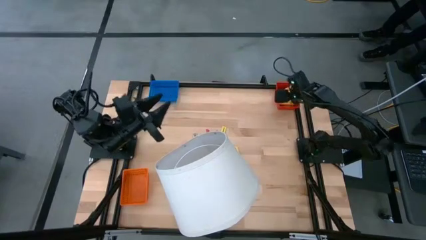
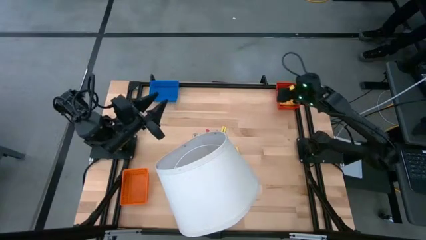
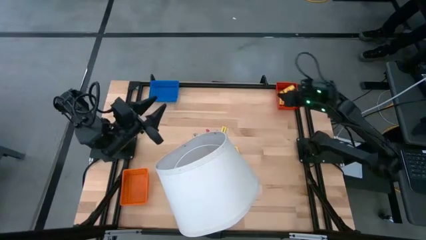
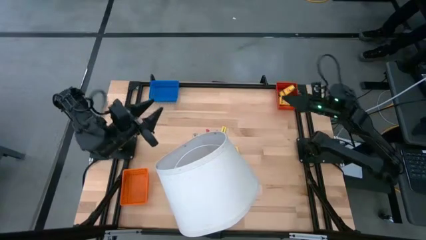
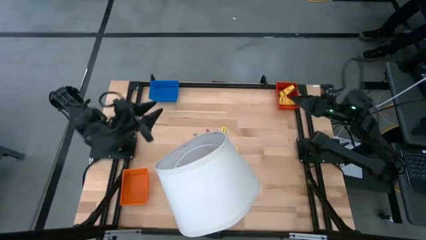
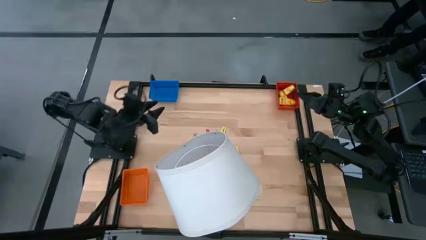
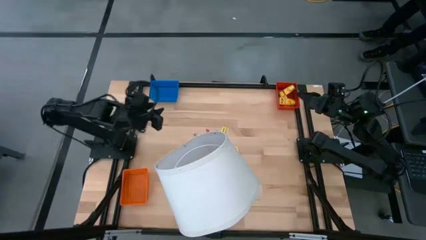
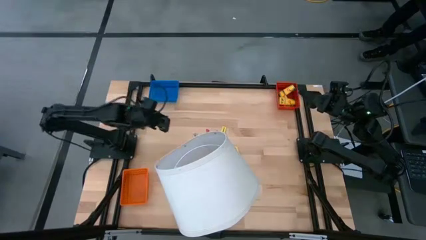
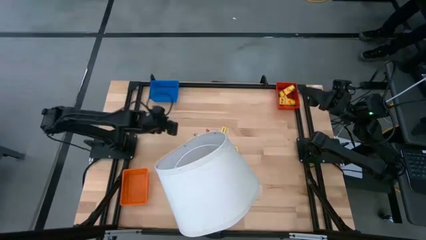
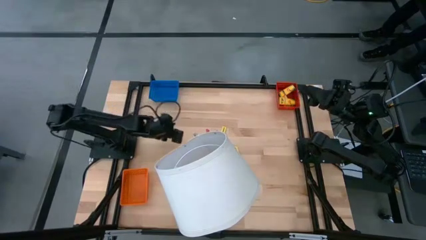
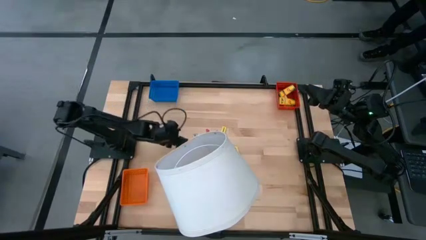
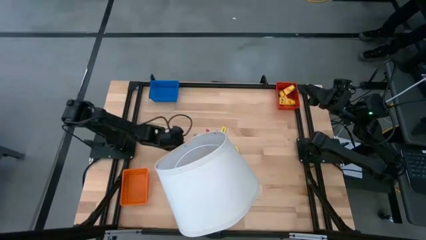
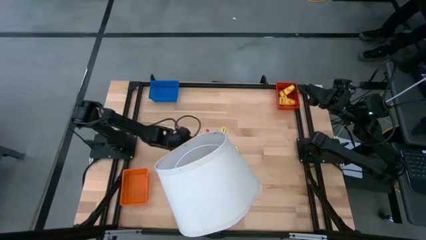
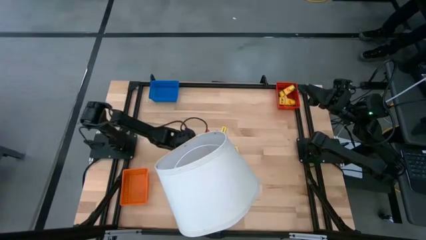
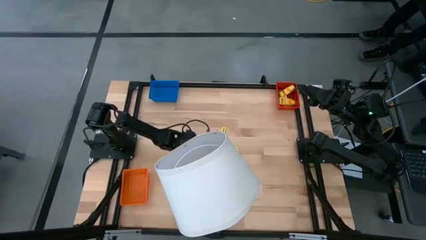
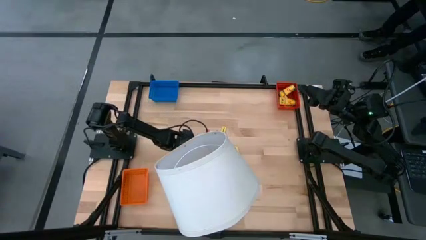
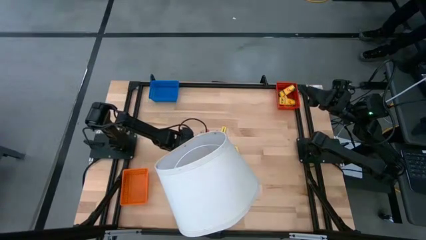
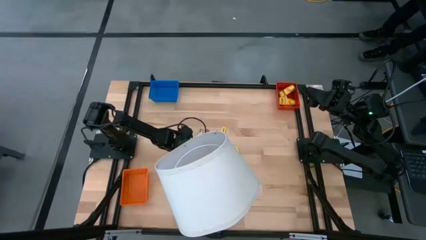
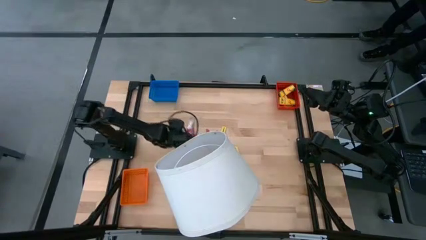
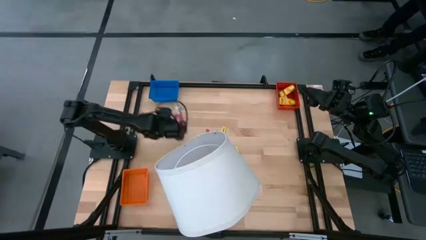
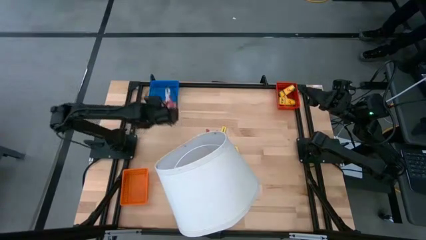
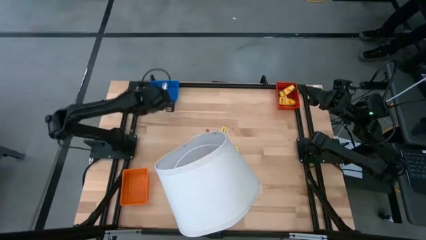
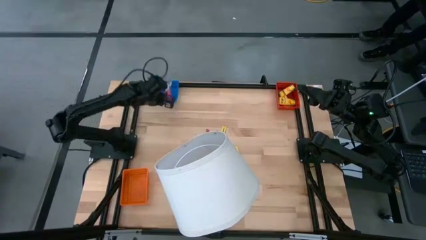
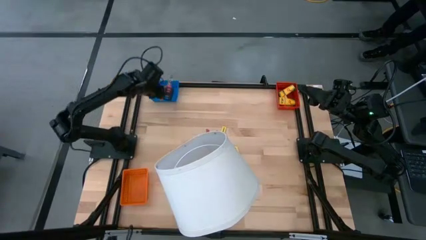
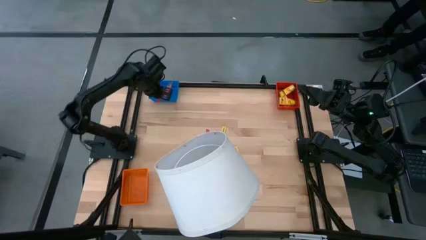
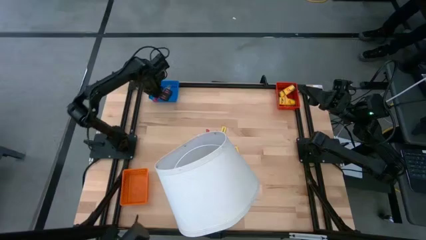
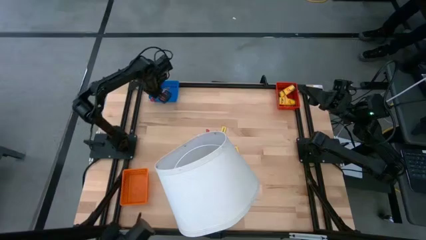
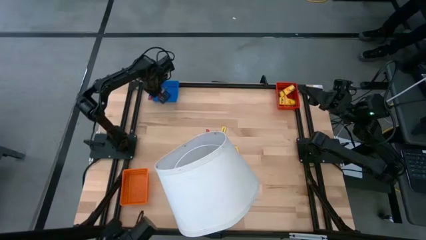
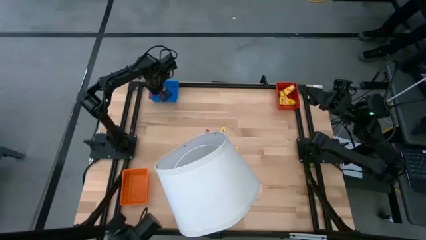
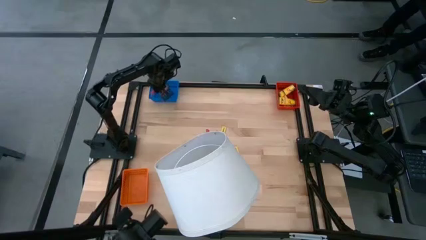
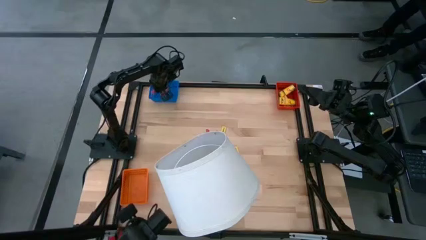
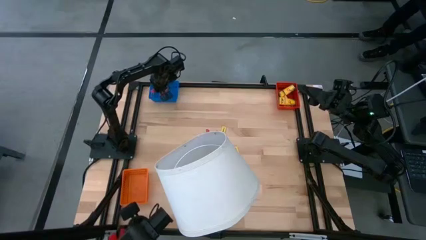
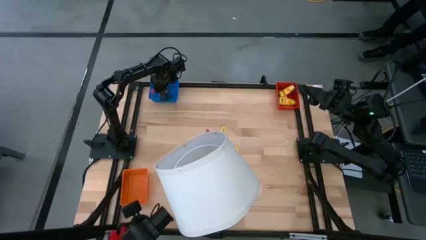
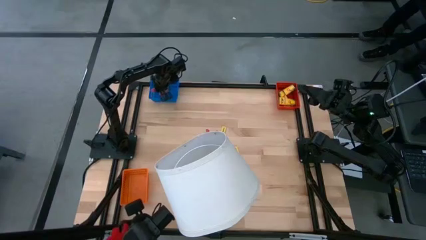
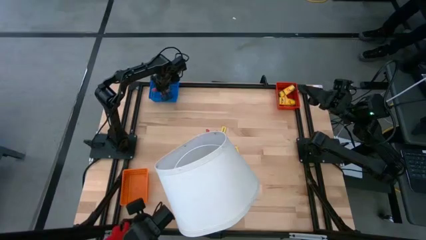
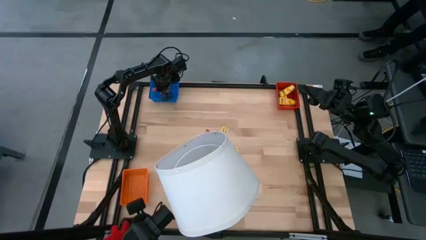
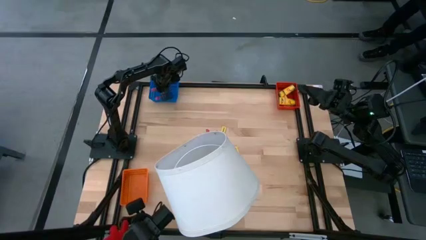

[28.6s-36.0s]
Task: Pick & Place School Supplies
Put the pink hole puncher into the blue basket

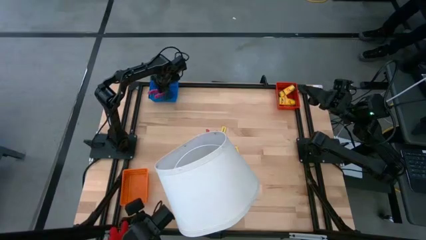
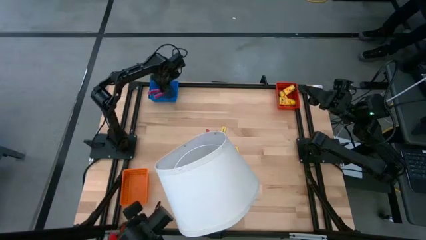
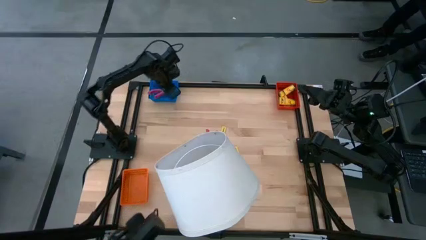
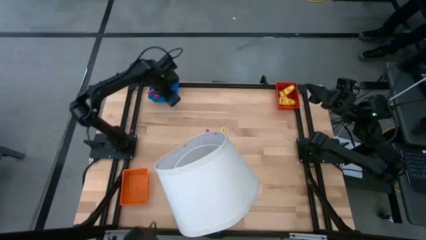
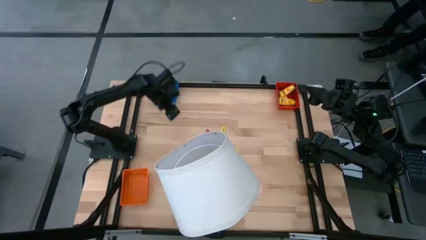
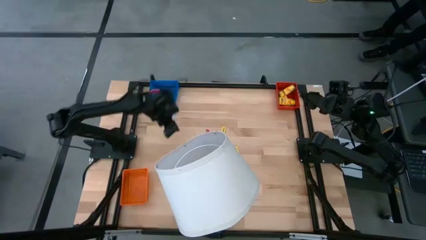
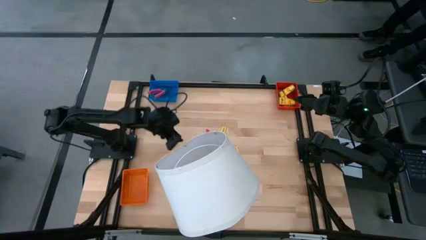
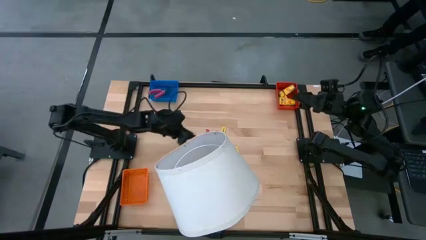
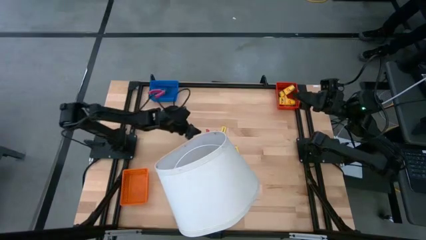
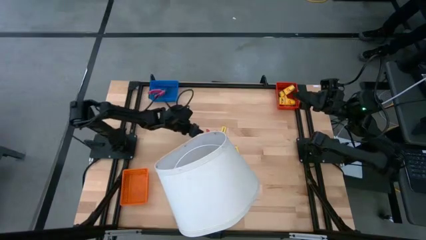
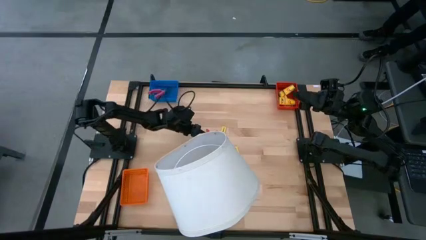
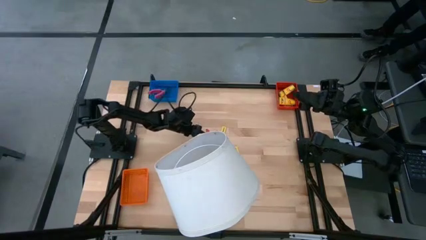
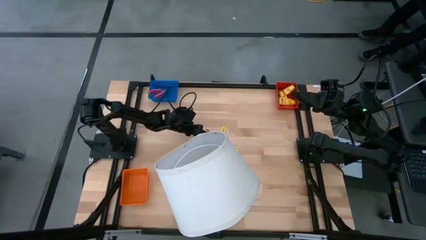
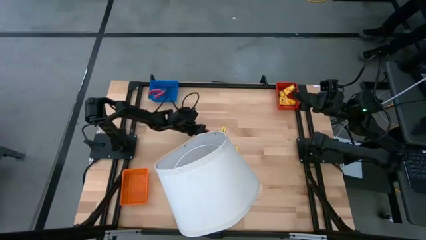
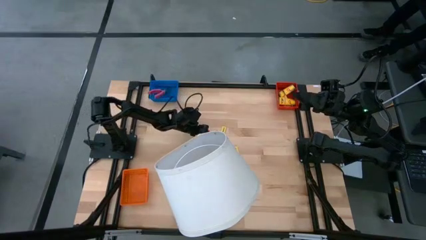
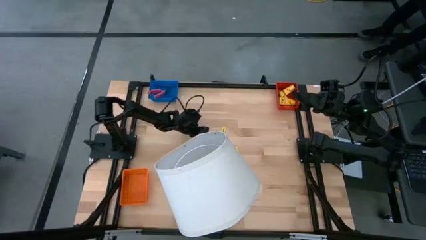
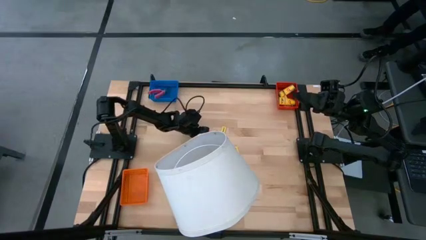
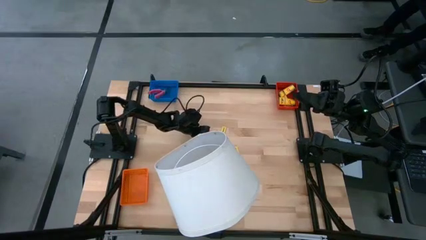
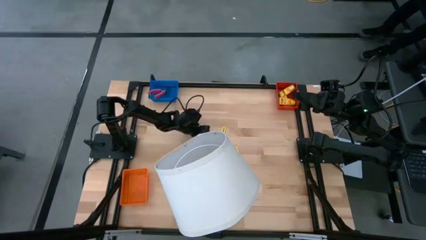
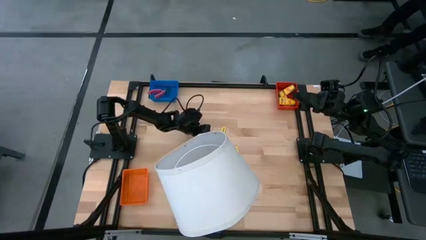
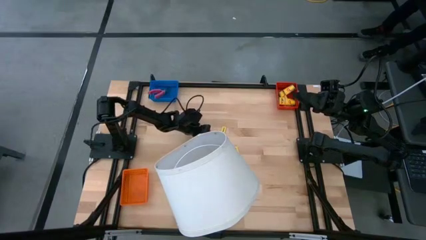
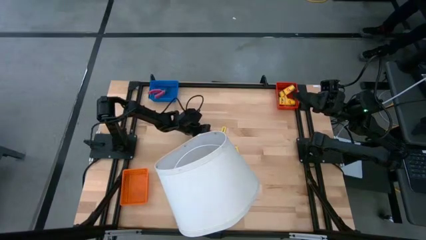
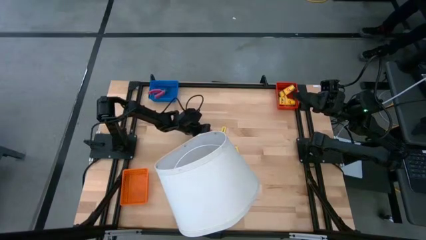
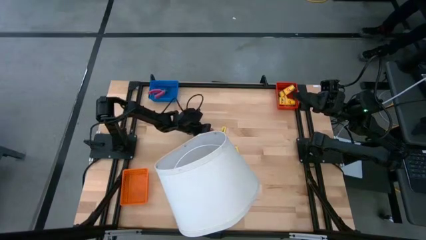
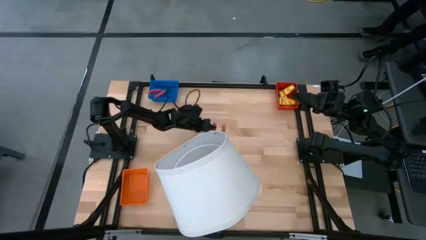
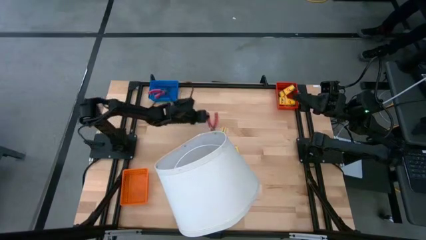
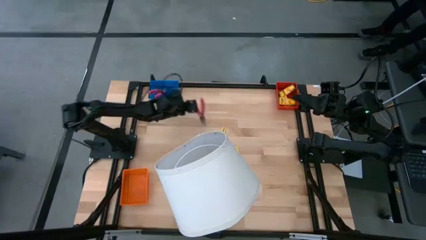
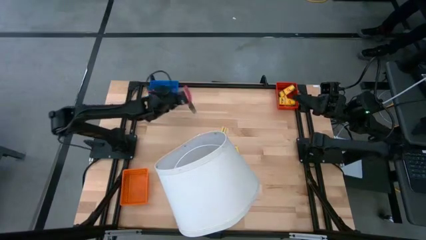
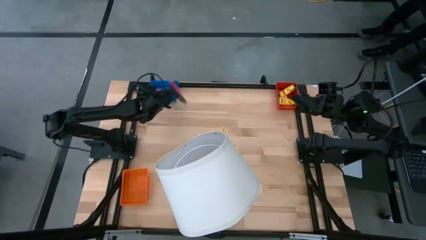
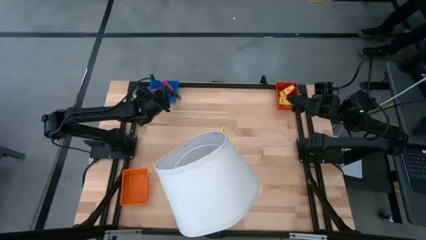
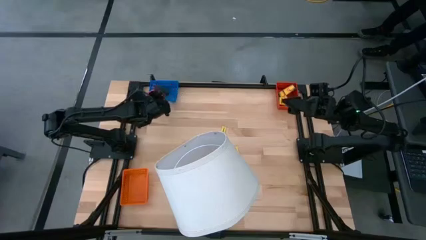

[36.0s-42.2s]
Put the pink hole puncher into the blue basket
